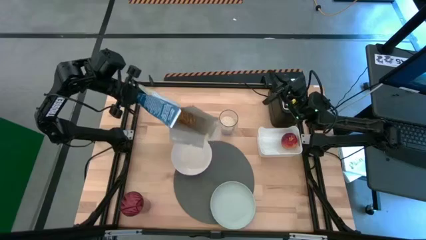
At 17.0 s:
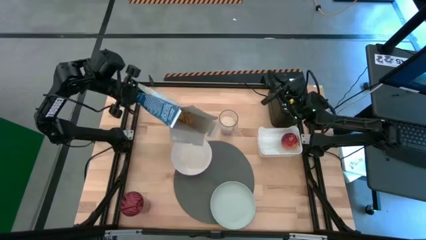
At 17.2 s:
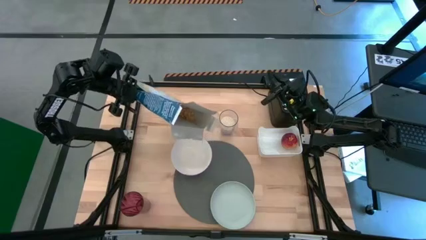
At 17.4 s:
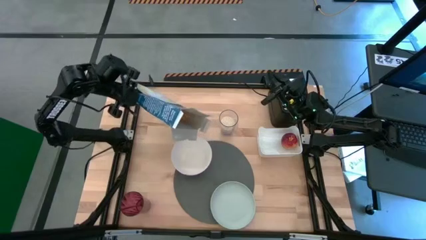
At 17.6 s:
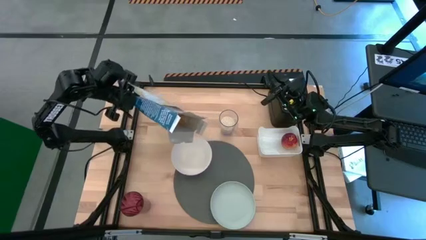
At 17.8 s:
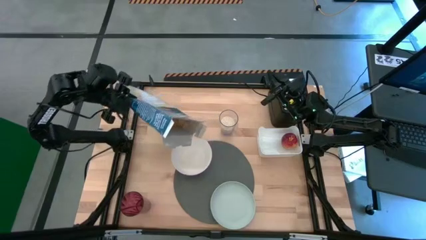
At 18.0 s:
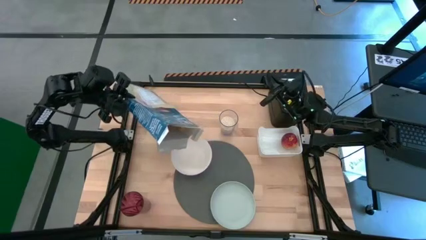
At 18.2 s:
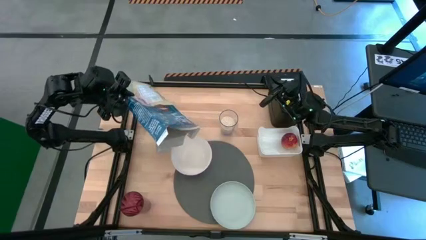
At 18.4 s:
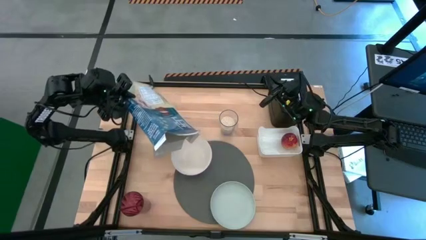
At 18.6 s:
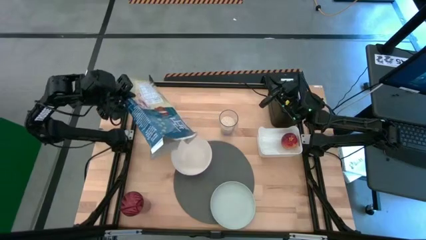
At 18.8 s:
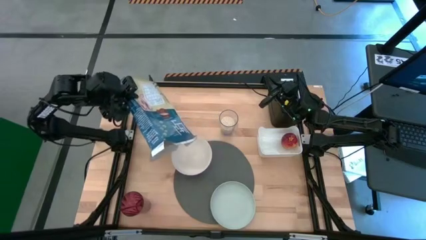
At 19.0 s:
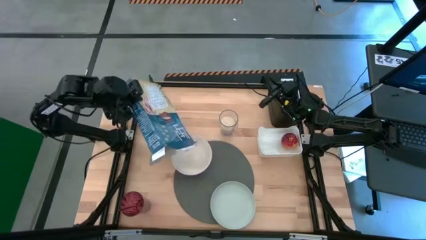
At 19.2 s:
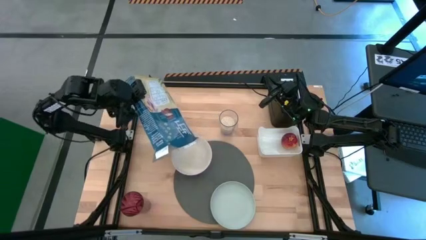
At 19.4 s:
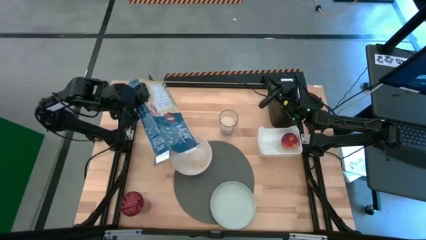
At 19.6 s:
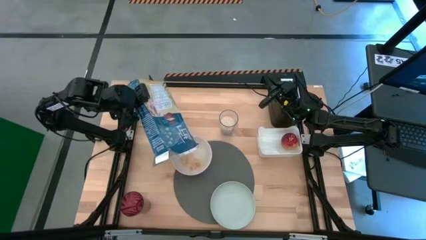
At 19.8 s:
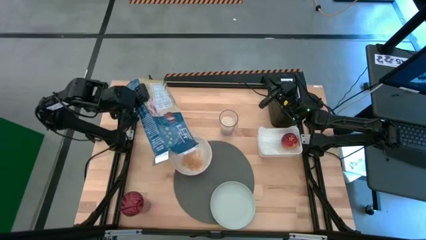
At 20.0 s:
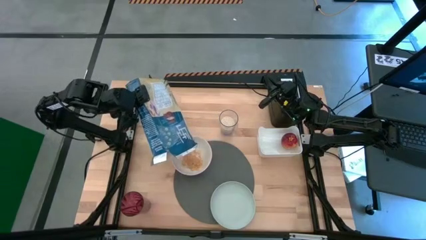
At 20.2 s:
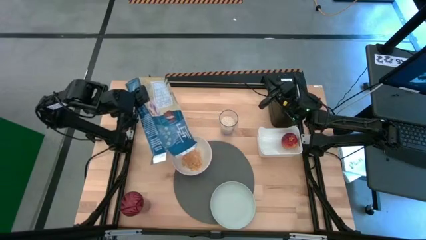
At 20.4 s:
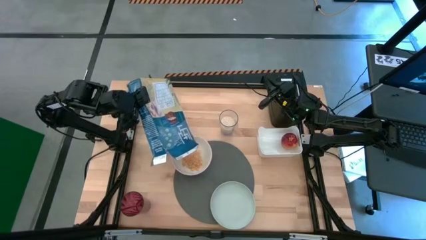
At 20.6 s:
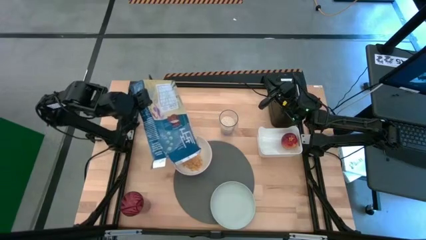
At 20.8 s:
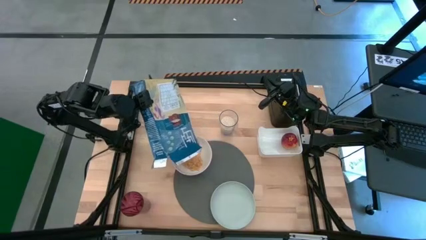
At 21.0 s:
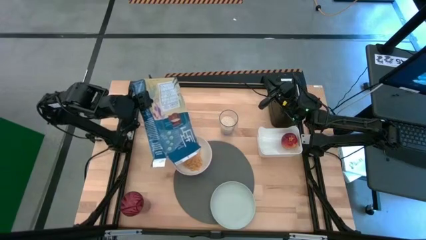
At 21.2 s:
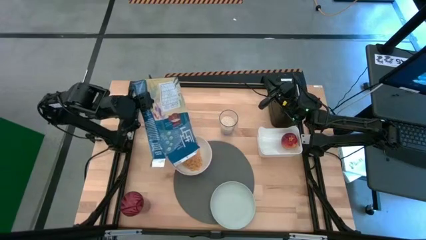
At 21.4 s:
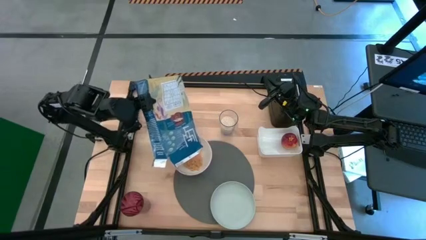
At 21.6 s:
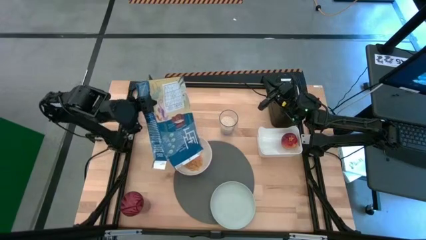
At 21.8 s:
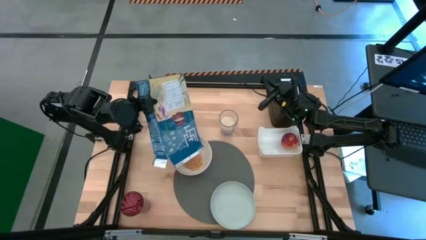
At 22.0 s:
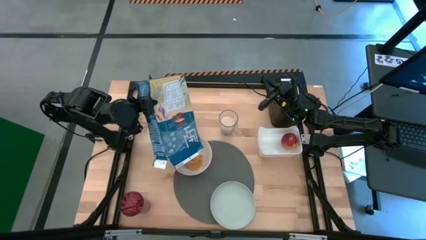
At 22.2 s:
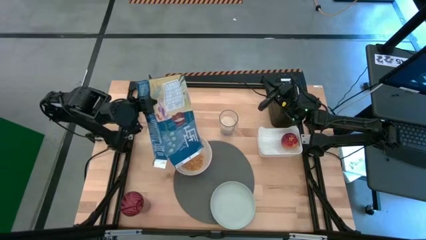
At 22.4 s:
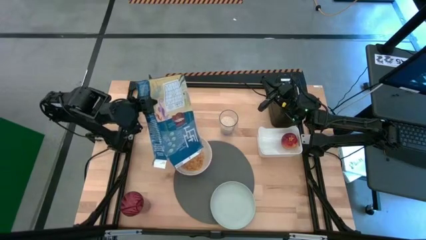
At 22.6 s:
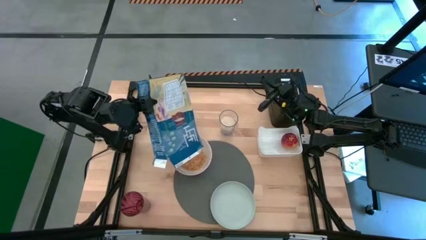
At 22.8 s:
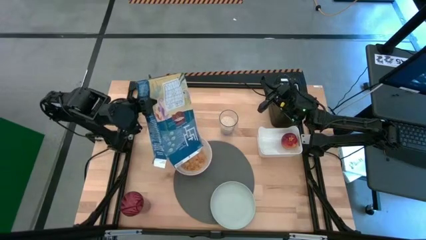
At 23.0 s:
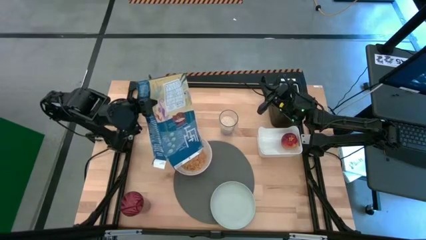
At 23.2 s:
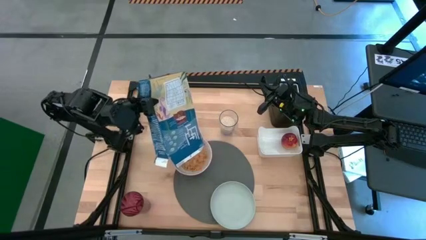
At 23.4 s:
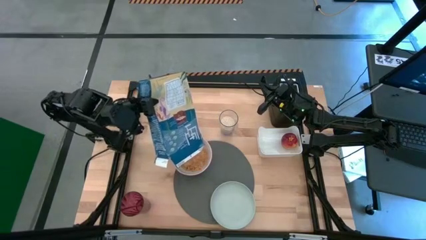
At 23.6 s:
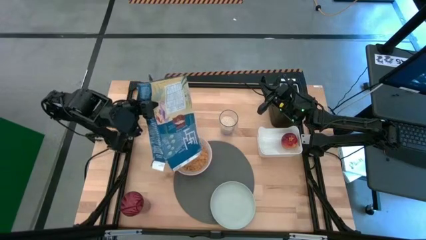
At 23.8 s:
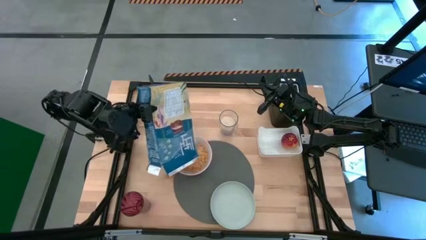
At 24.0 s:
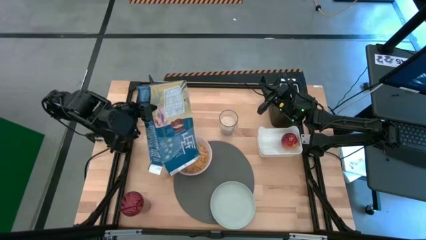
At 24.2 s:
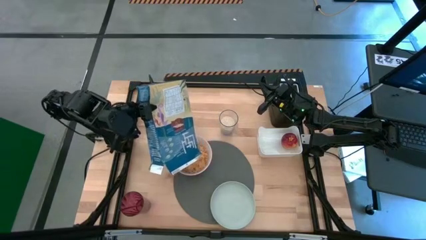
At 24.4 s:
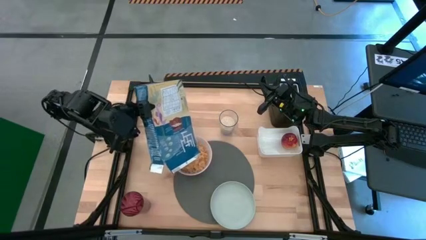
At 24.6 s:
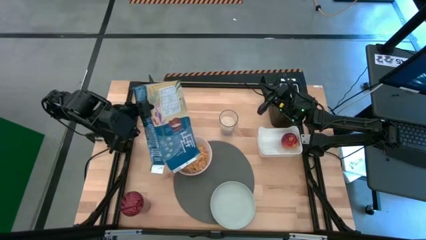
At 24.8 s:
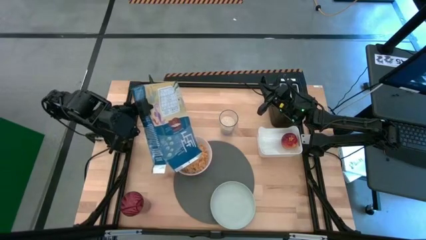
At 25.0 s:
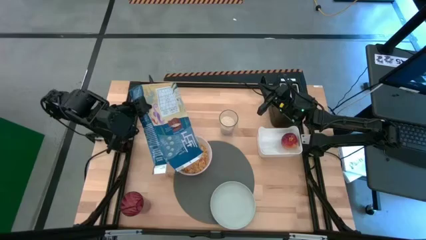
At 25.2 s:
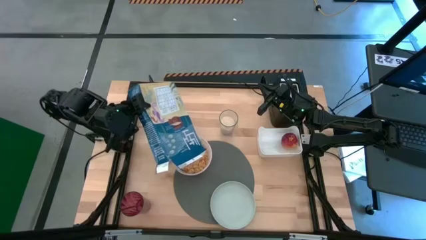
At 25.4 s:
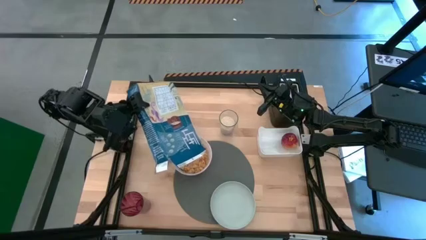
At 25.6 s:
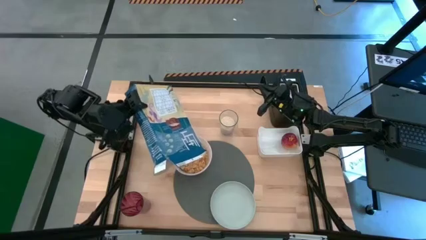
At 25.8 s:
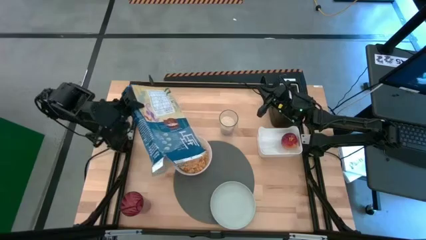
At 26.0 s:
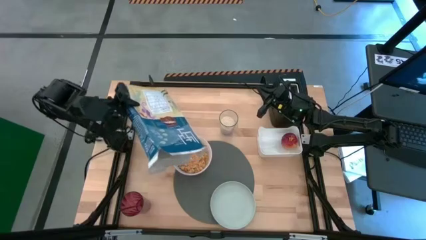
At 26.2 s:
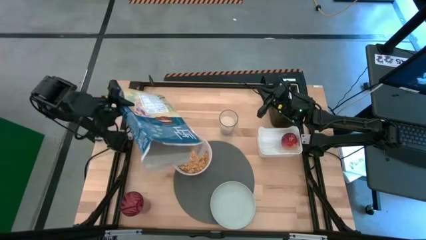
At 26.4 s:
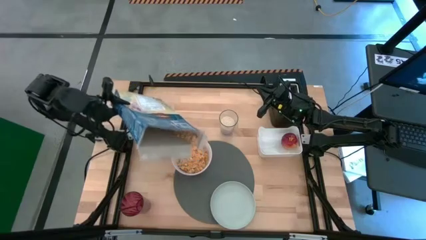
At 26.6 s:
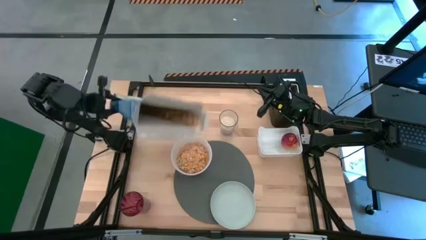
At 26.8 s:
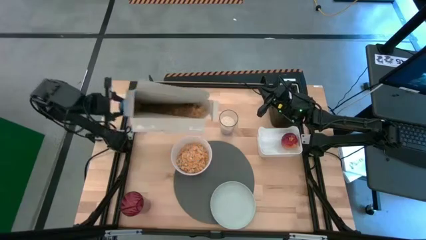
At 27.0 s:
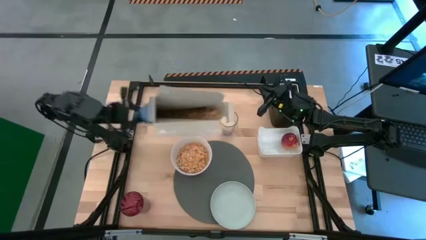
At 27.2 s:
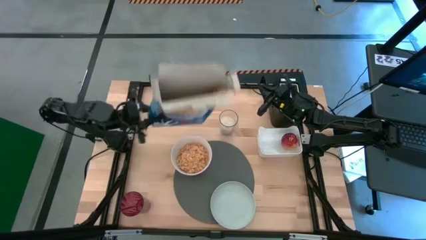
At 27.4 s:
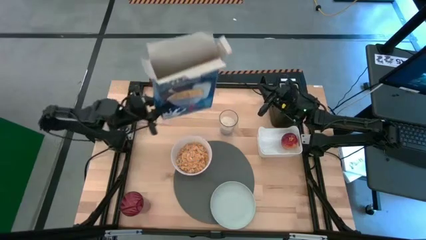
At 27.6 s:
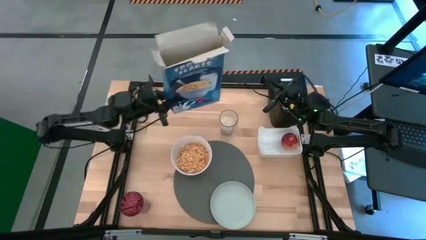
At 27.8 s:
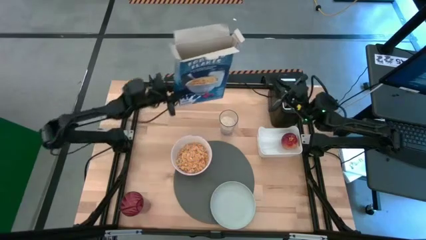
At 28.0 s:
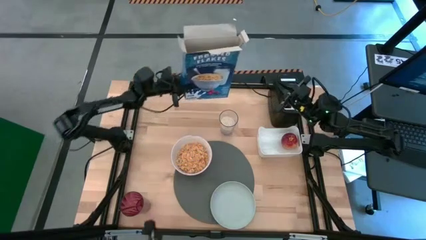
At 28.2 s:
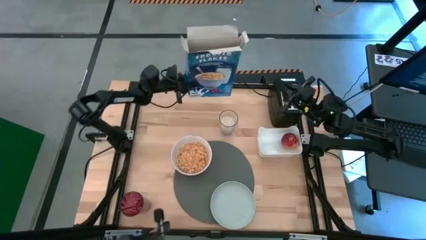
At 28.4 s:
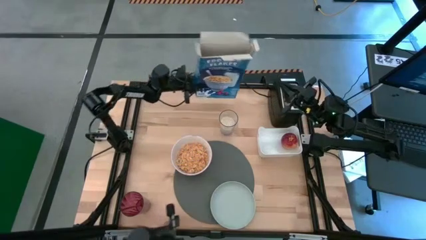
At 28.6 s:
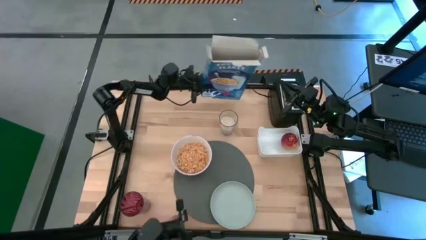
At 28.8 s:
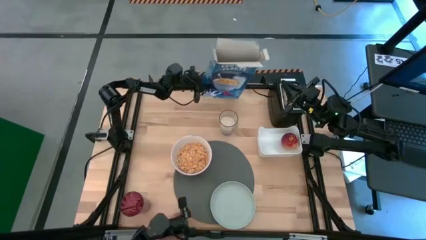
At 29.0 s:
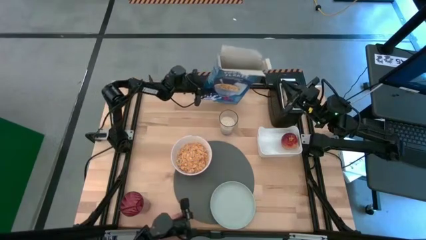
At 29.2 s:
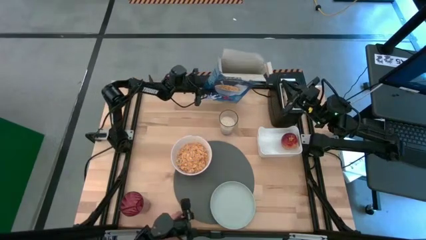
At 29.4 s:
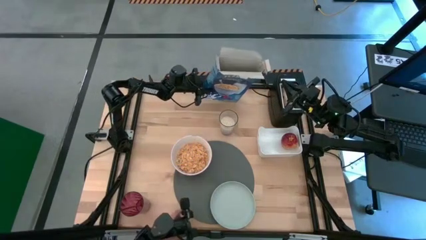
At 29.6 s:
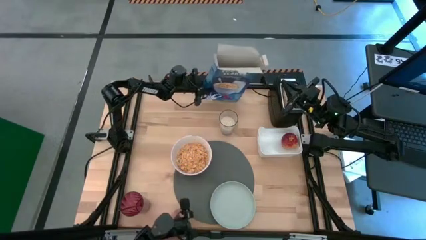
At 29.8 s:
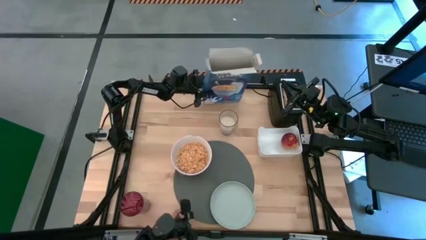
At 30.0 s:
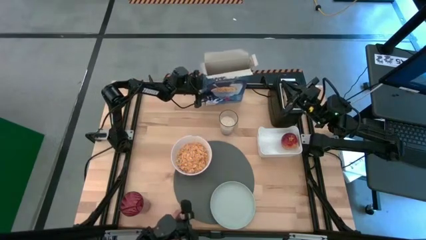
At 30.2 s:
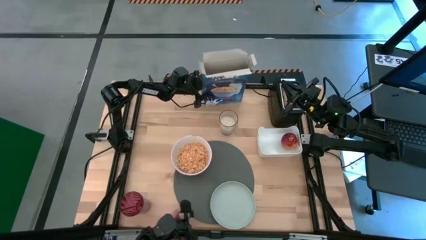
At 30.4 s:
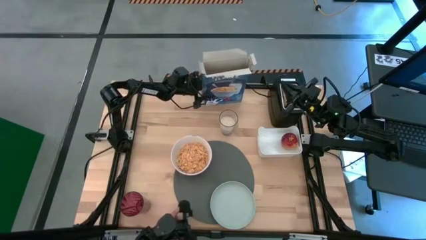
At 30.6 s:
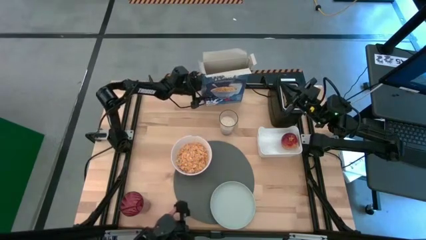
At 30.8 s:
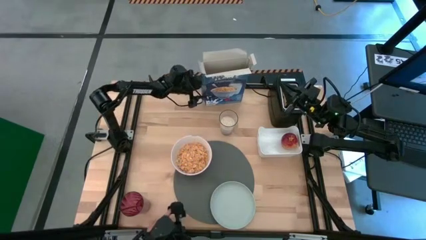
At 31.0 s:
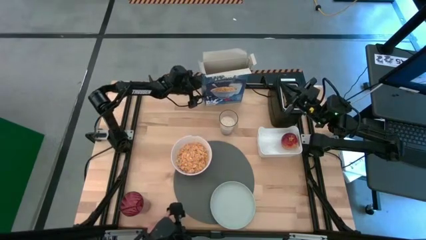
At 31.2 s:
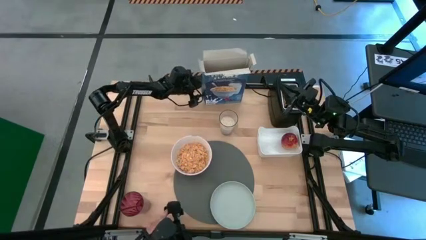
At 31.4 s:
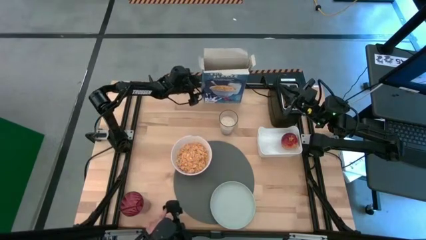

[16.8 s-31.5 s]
Task: Arrange a breakfast setting
Pour the cereal into the white bowl
